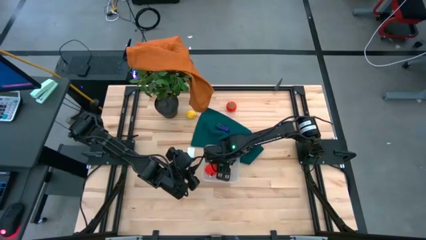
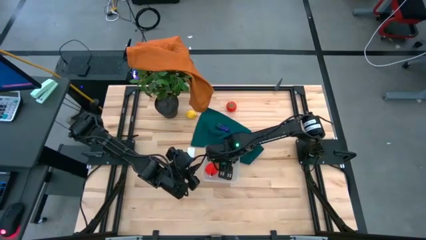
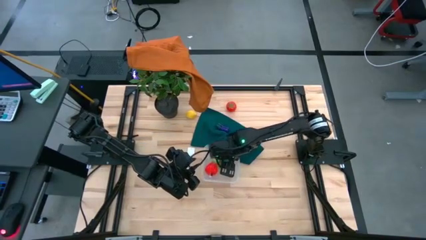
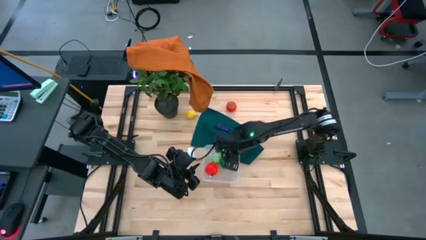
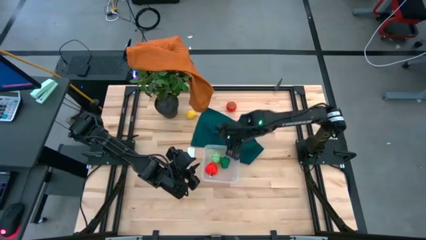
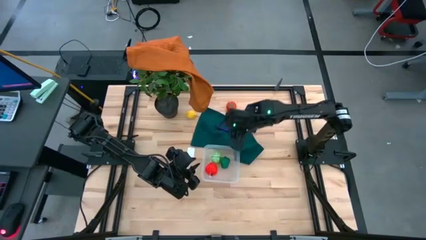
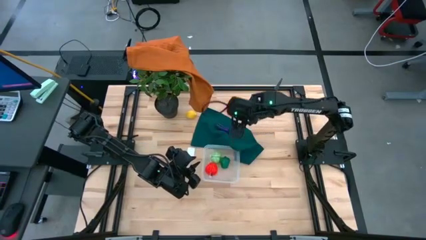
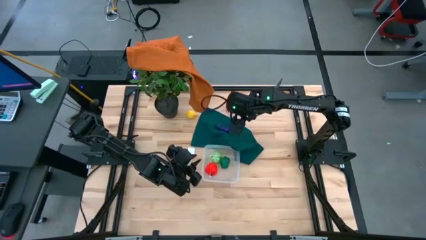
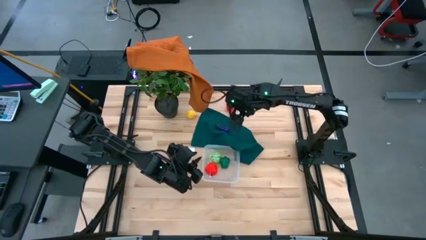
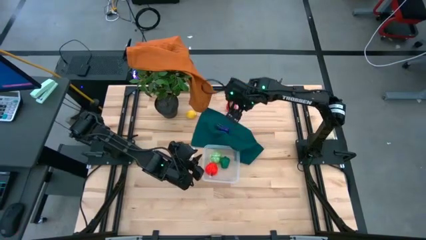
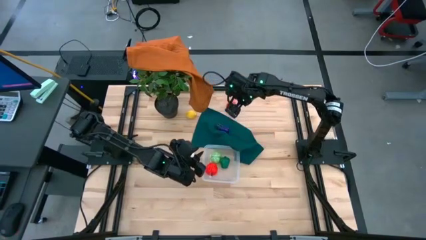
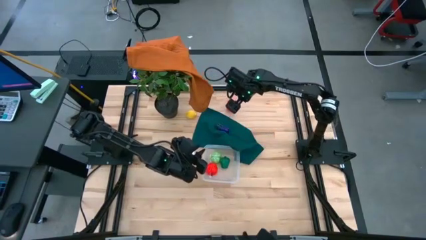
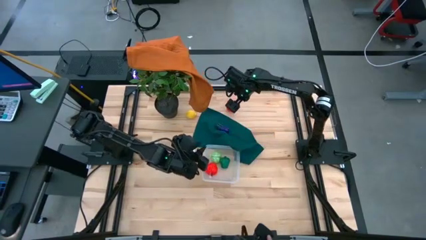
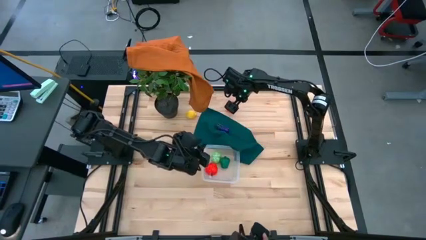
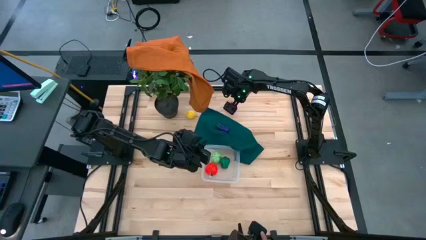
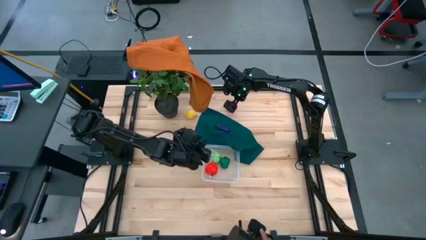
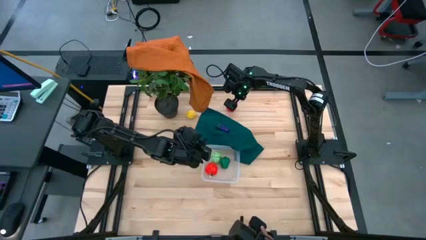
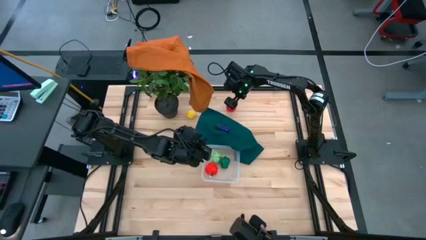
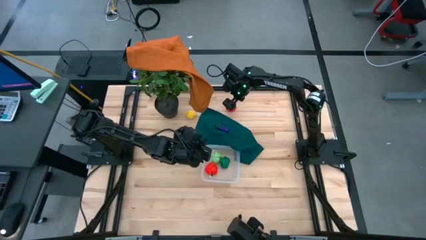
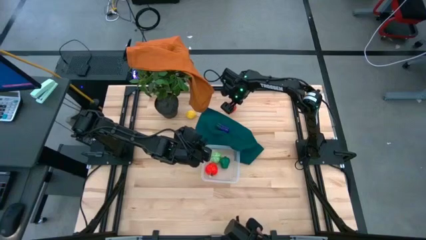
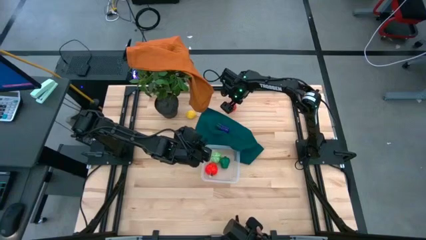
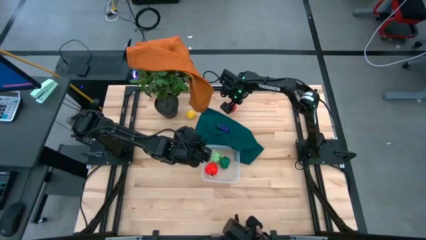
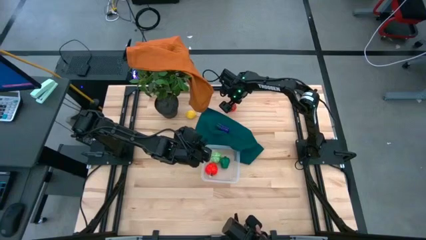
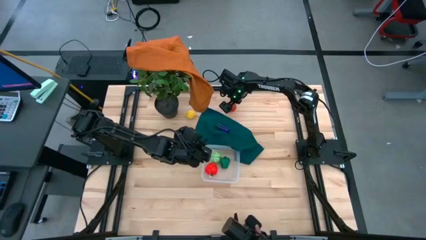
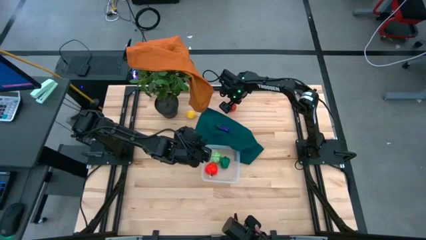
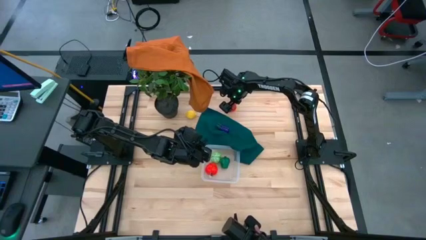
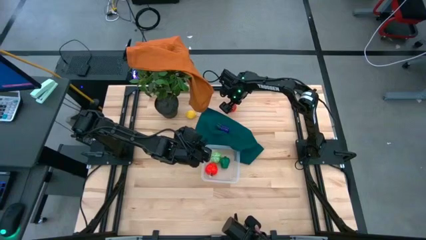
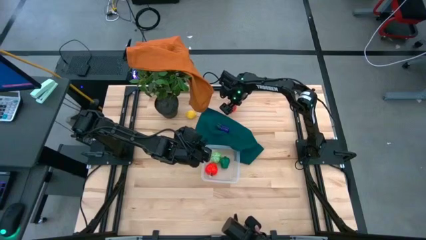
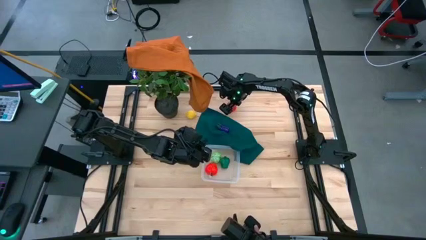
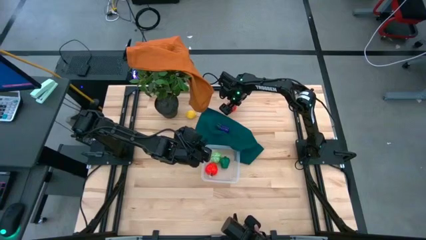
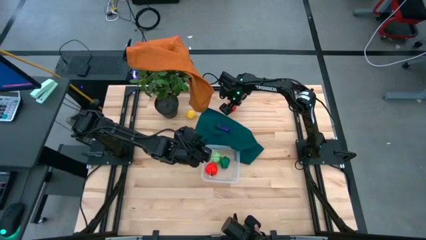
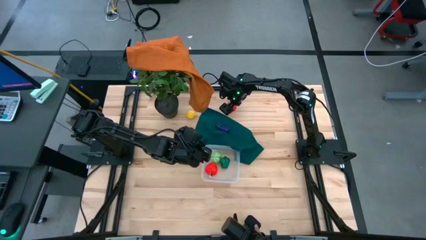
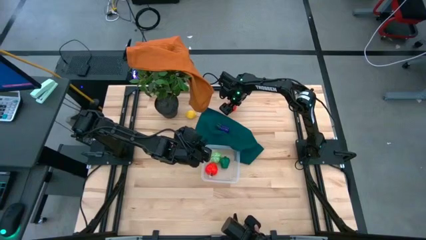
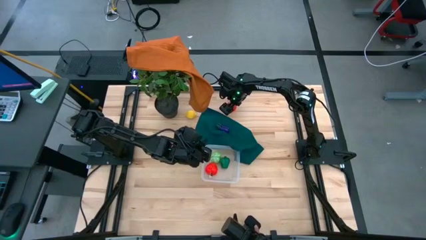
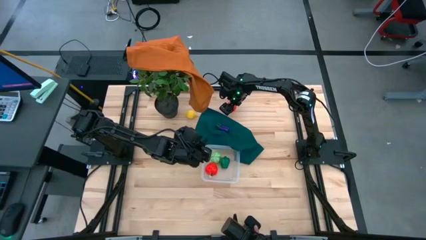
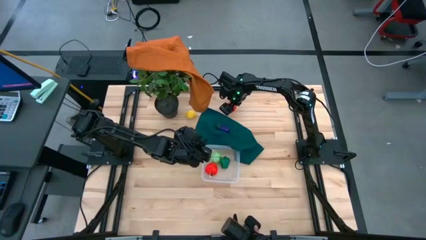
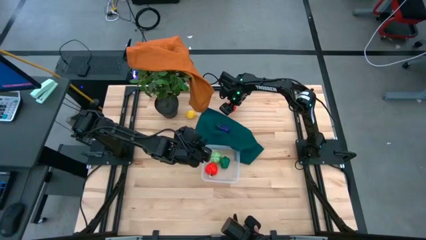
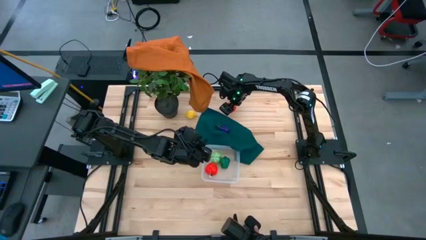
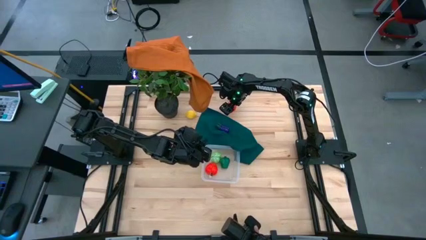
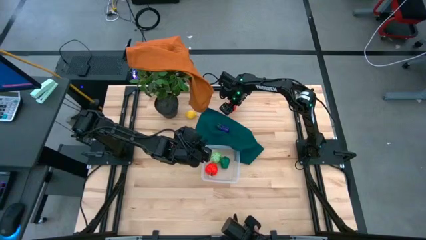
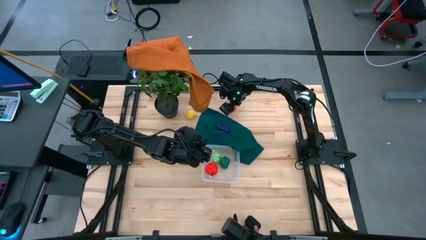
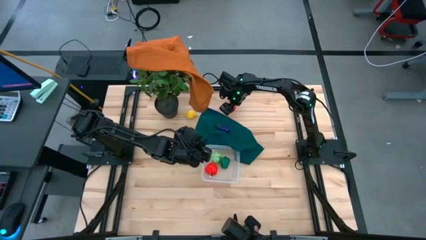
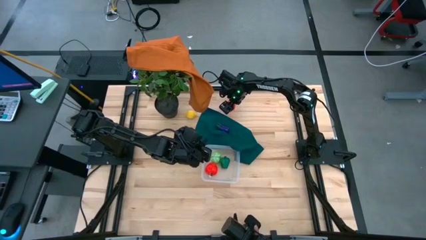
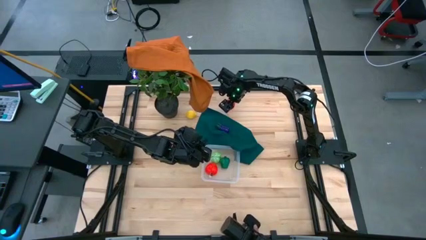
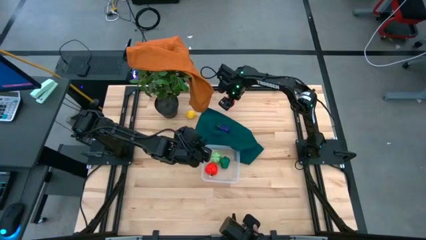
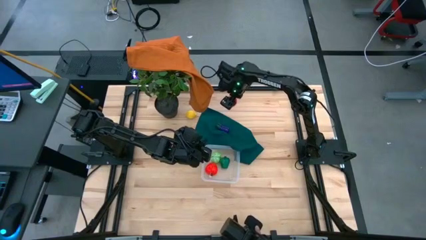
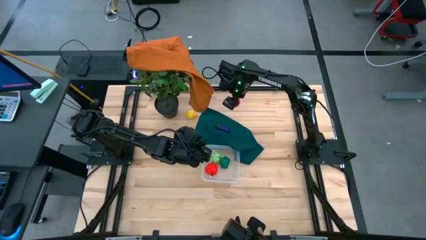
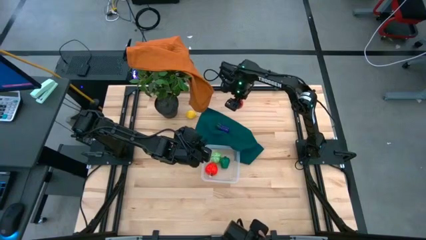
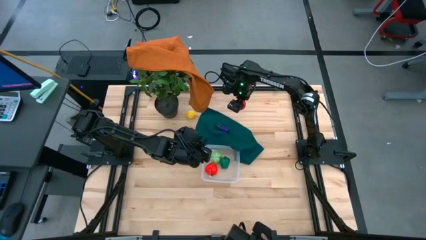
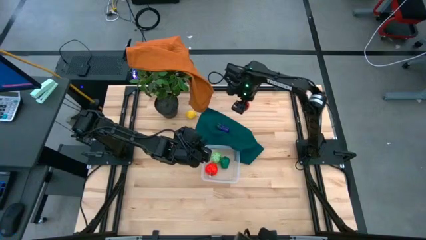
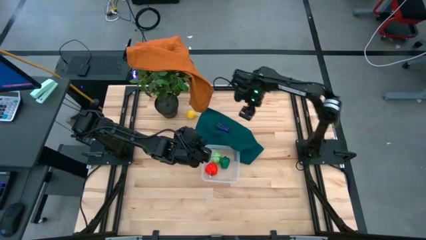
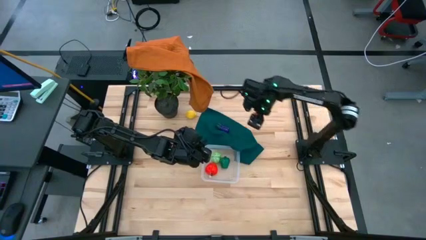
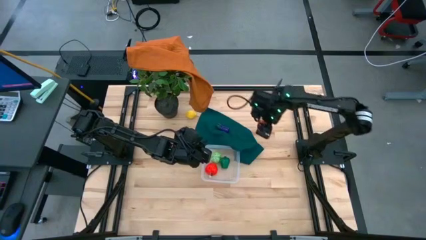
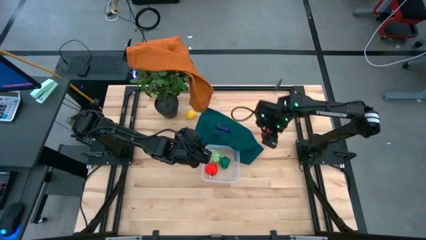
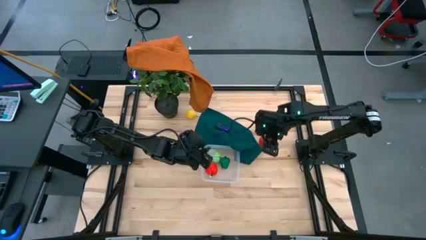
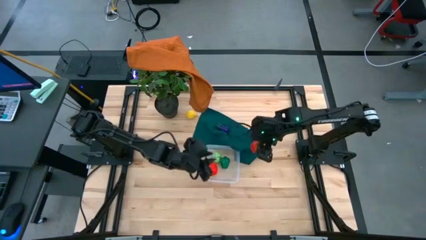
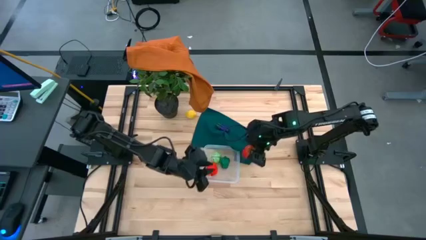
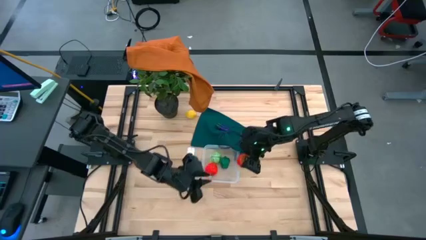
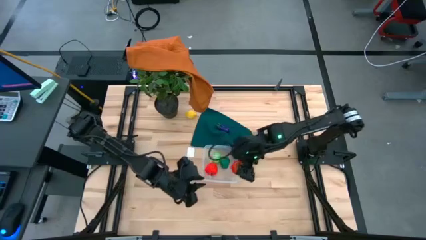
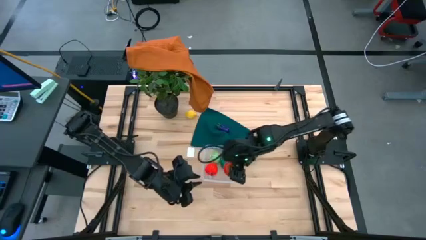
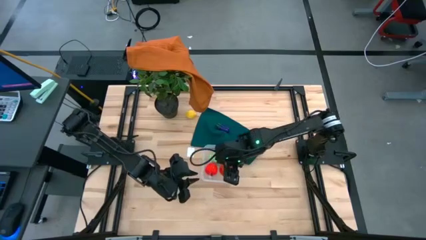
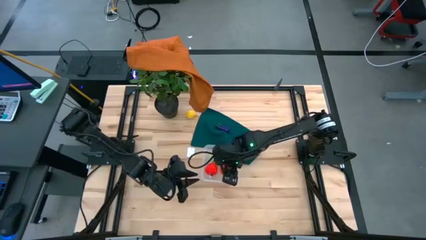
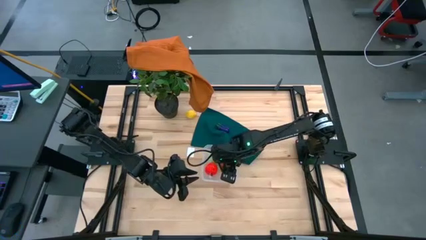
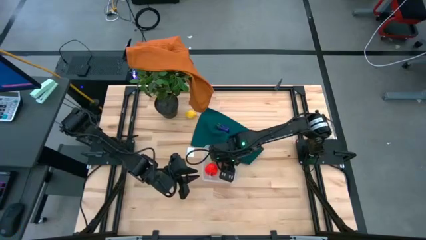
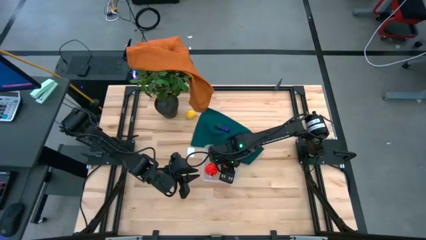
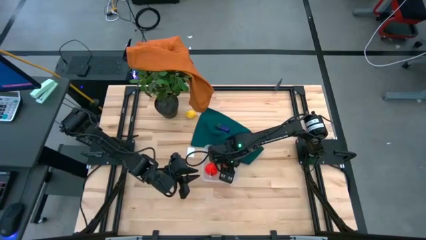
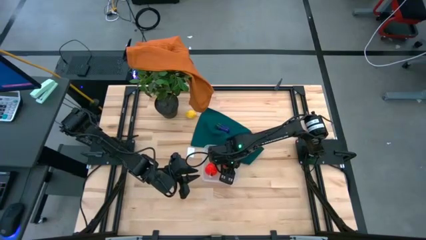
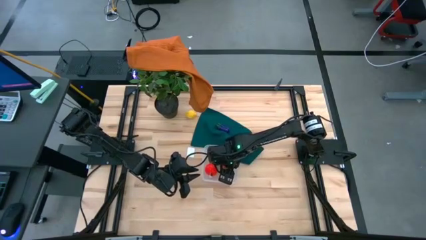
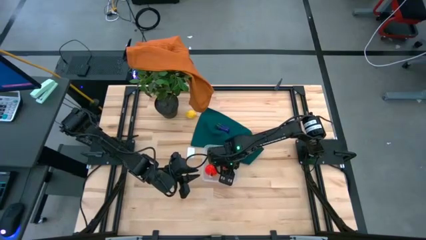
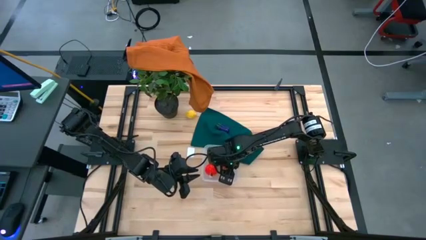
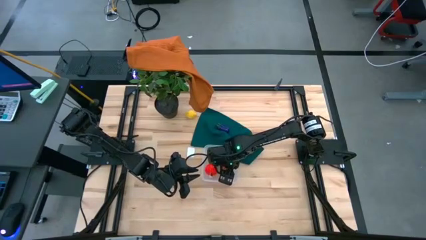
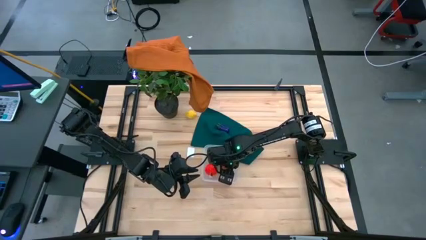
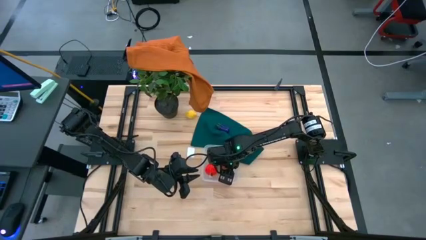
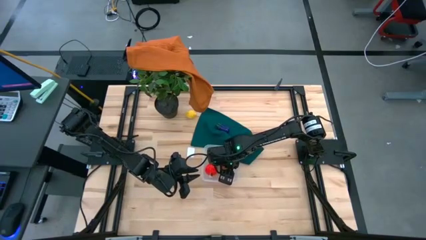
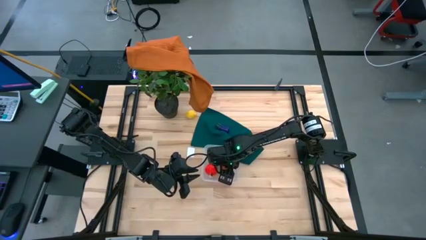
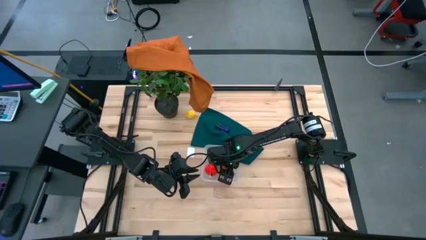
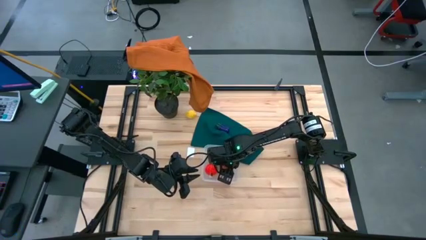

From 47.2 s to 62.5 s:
Task: Pick and placing Produce into tupperware
Put the tomato into the transparent basket
